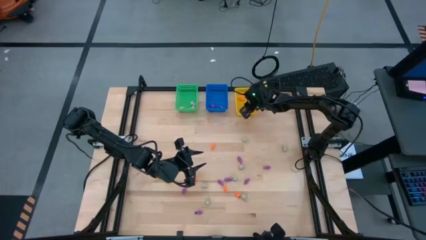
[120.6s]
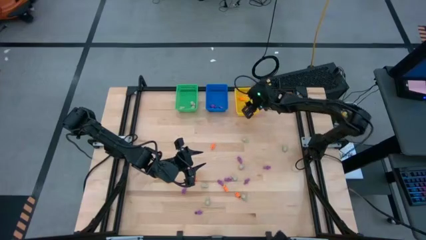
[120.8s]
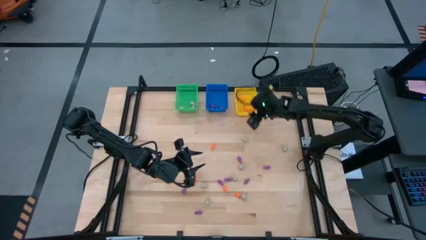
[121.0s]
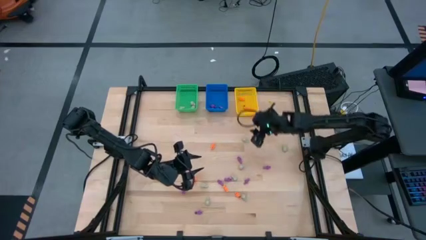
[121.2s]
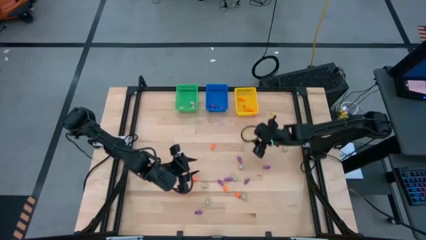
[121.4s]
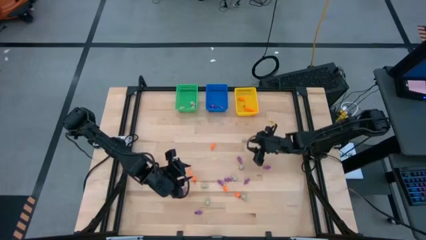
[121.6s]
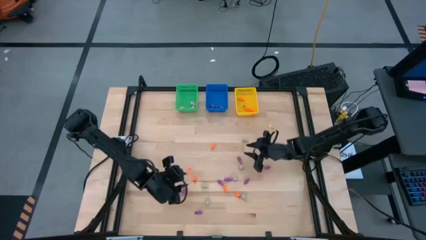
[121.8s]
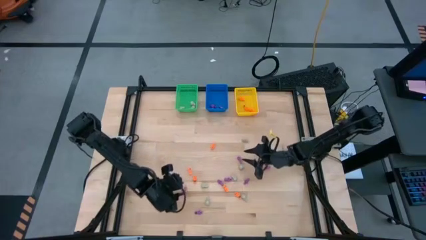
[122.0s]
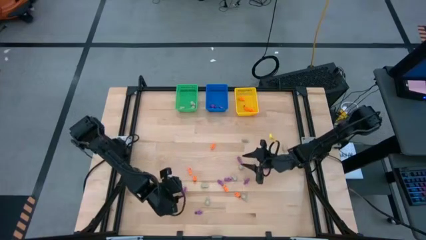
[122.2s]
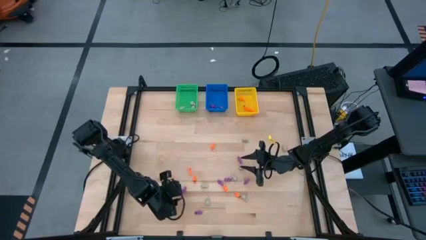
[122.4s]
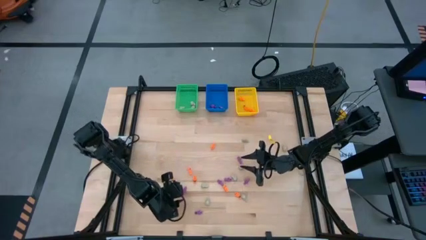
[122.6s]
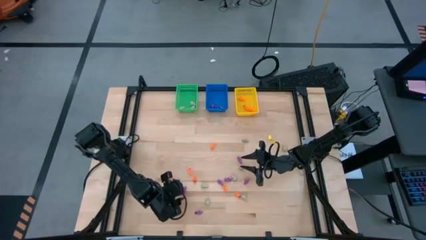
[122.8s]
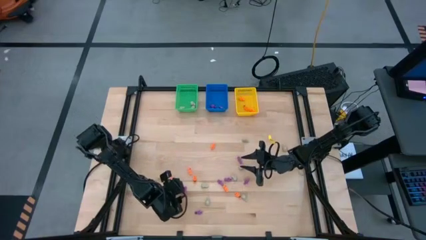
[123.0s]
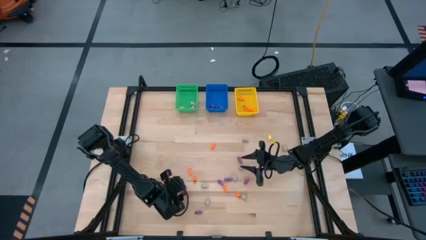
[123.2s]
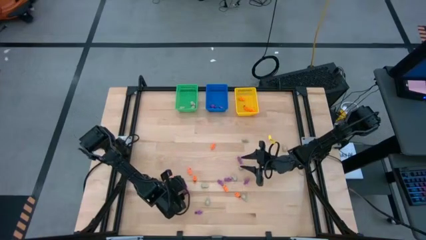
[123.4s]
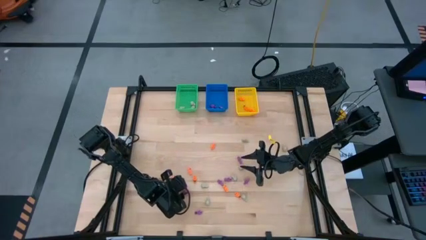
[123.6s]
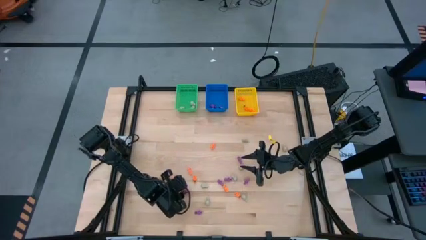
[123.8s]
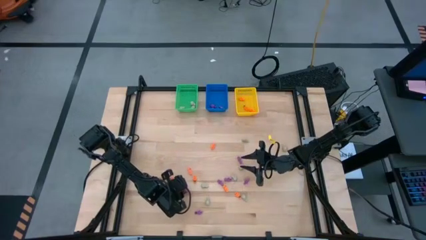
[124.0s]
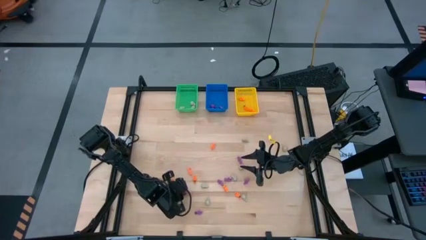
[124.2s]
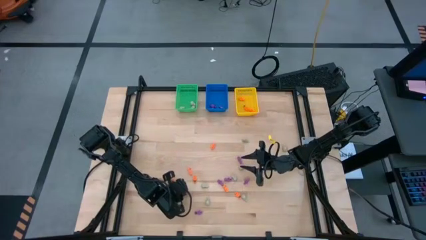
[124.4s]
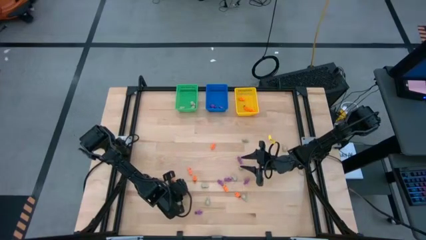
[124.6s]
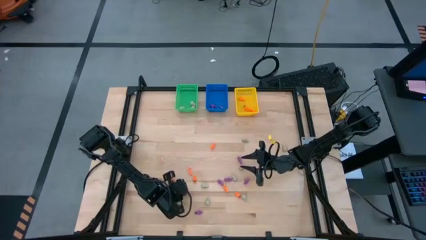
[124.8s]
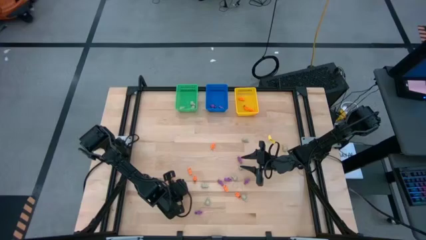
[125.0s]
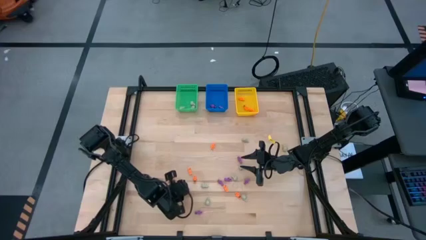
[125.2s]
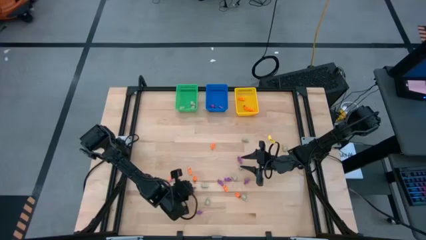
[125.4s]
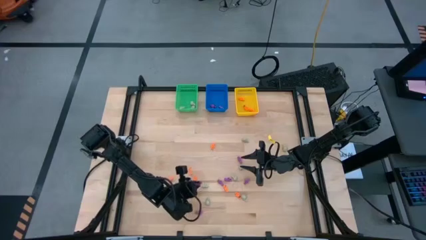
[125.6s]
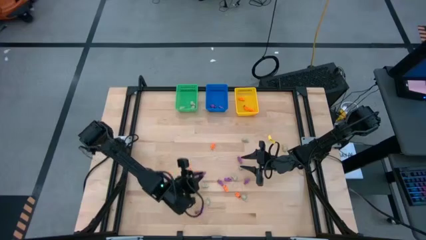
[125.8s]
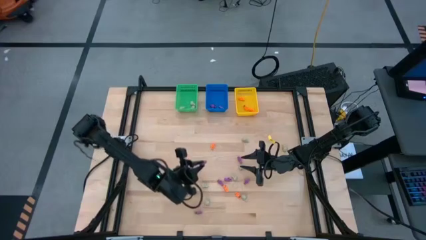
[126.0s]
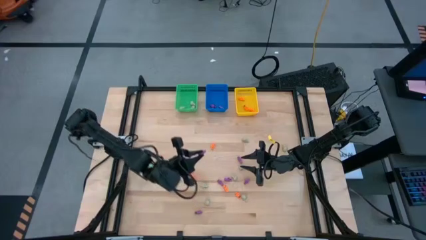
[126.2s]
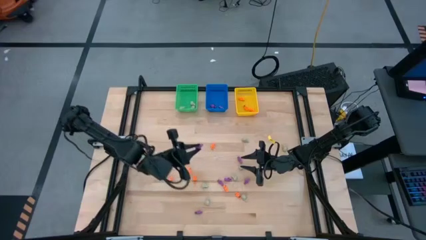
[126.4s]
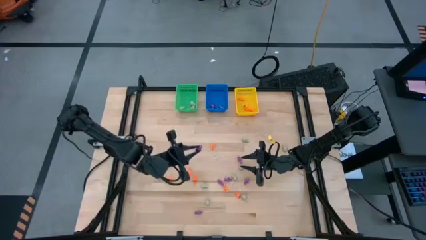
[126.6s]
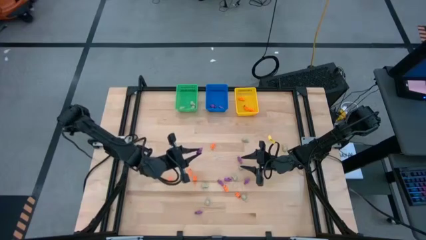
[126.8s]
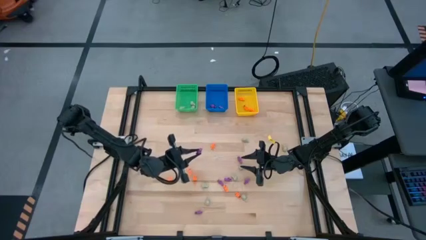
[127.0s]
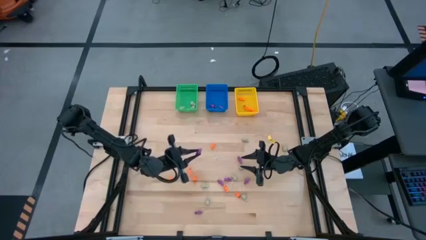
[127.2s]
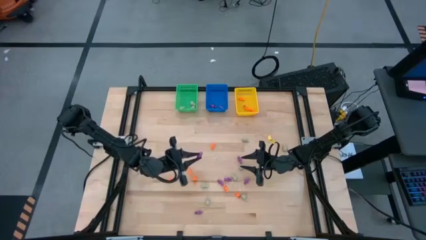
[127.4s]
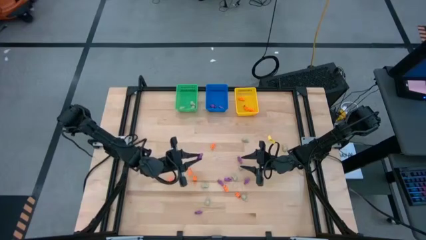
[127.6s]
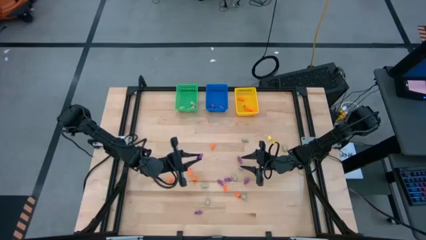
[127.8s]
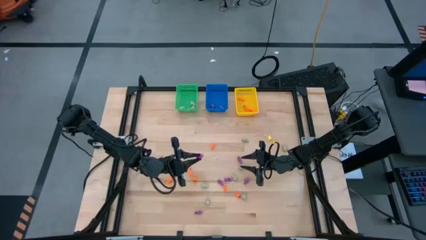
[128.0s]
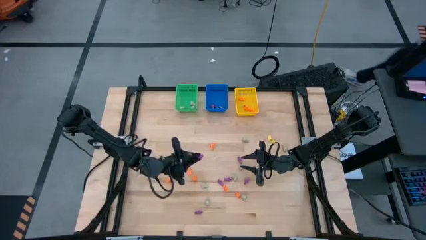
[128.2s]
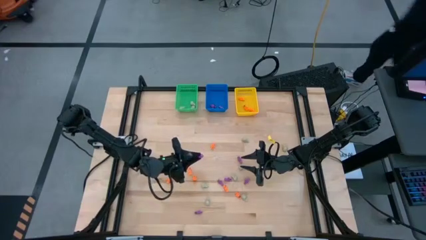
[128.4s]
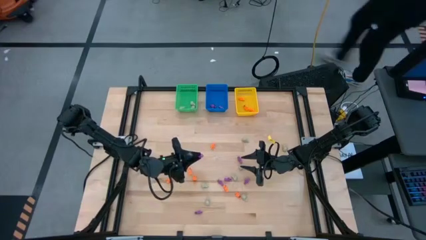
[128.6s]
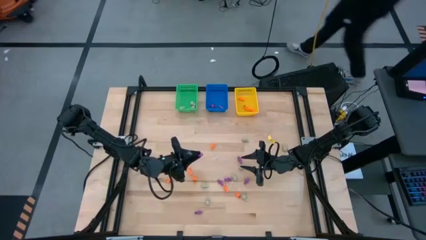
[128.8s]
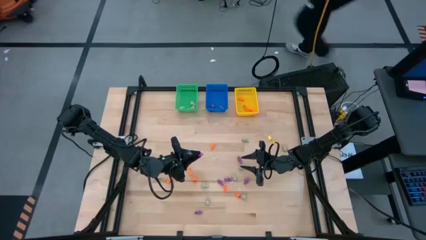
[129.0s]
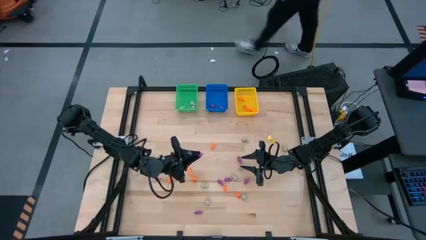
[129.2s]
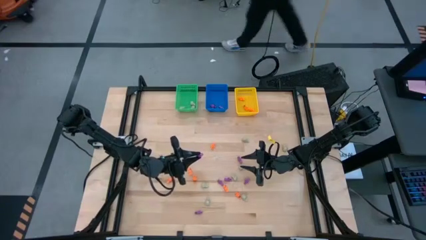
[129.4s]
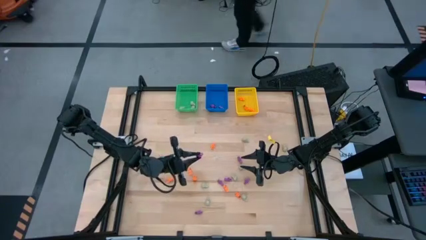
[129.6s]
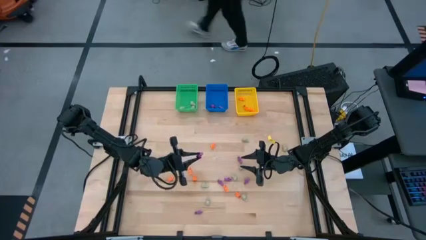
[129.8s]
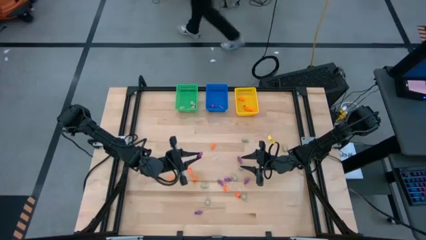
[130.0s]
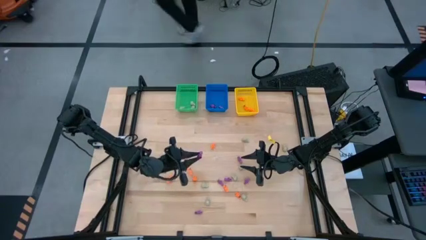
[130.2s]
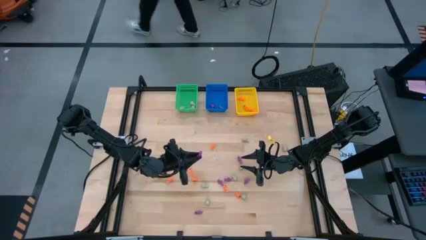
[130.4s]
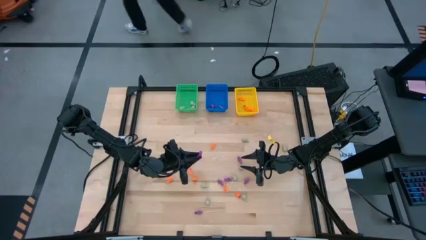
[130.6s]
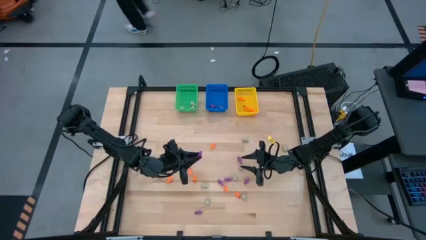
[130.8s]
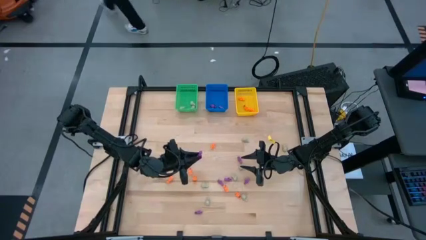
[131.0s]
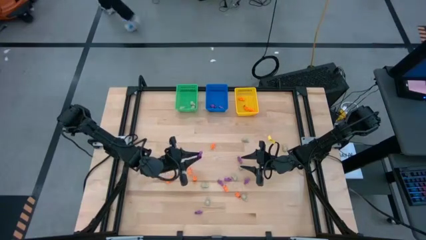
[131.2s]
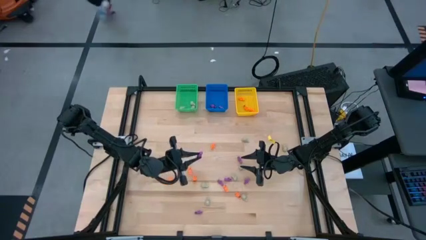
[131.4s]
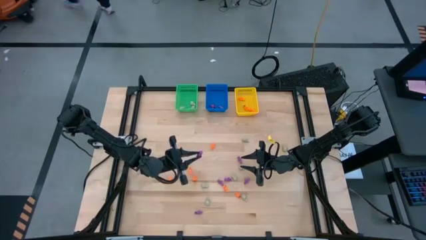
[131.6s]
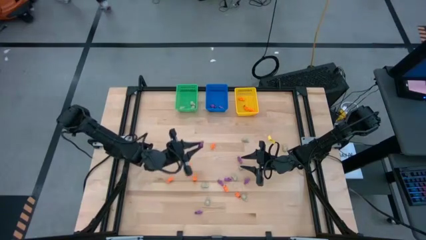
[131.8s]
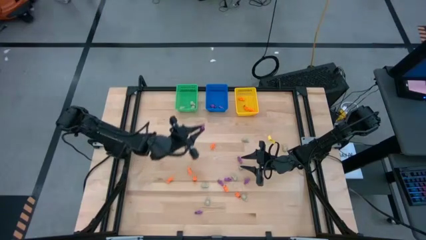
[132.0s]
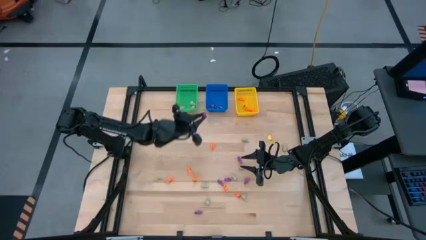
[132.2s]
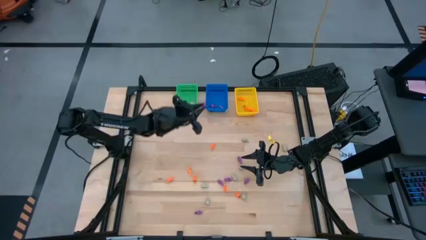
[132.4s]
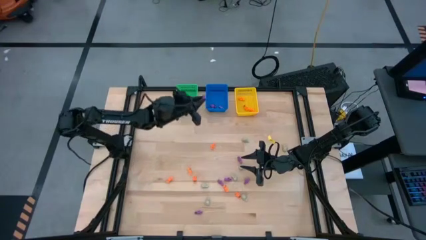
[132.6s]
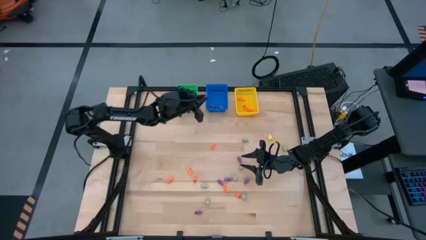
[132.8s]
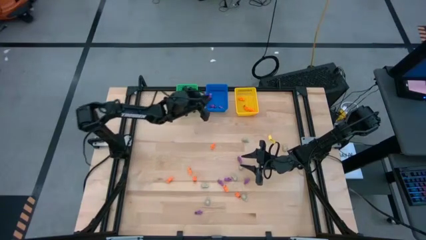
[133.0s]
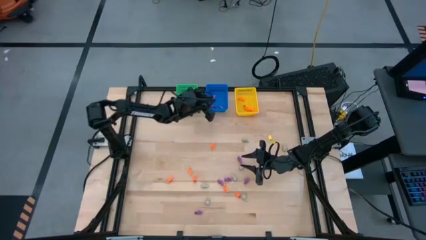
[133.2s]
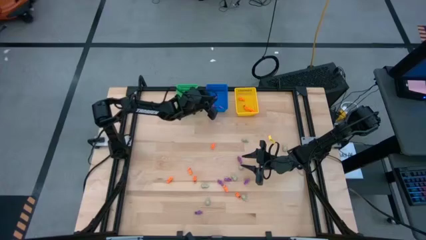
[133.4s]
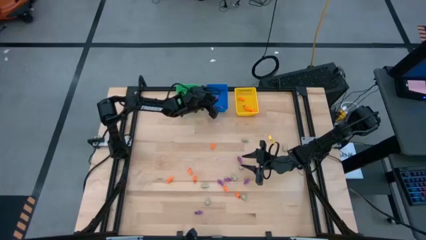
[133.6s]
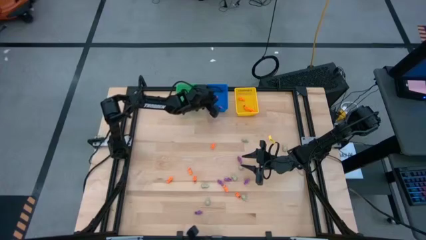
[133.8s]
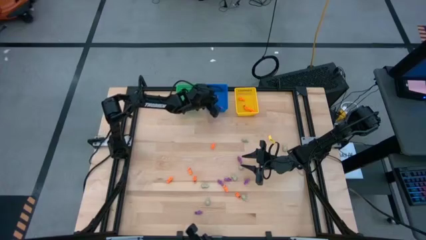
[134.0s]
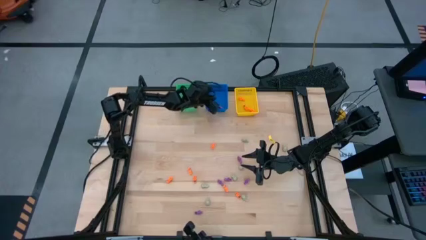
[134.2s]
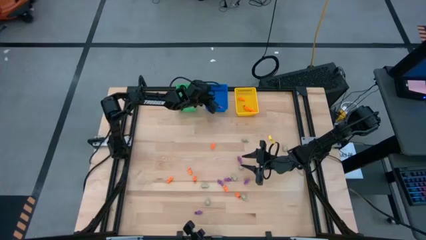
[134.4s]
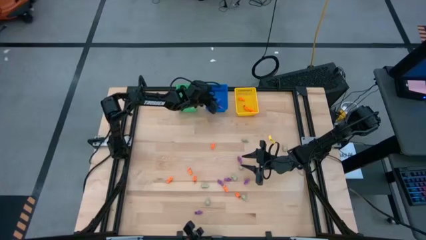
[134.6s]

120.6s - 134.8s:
Task: Sort Halloween decoration
Put the purple skeleton toy into the blue bin

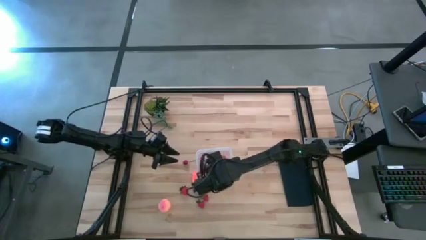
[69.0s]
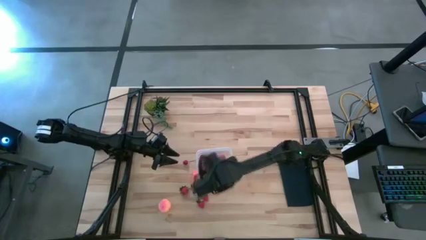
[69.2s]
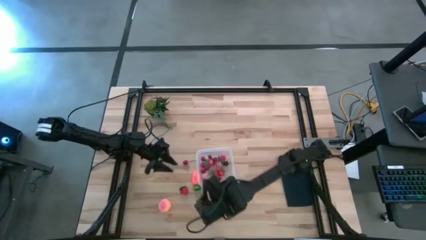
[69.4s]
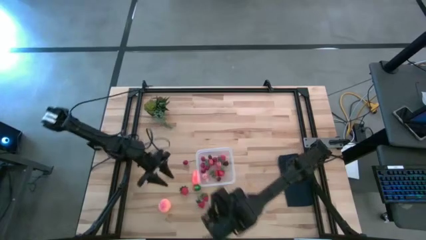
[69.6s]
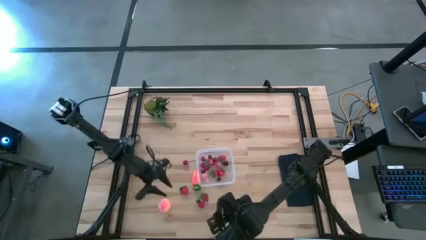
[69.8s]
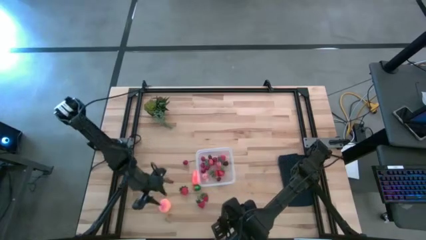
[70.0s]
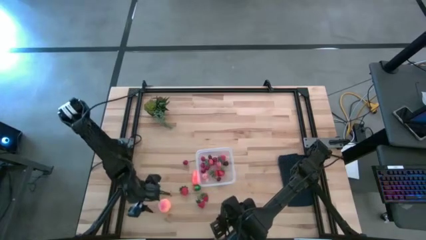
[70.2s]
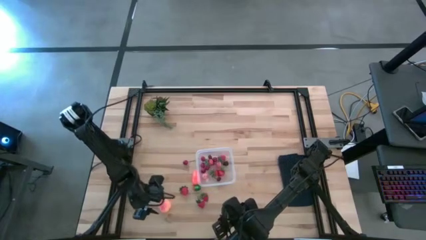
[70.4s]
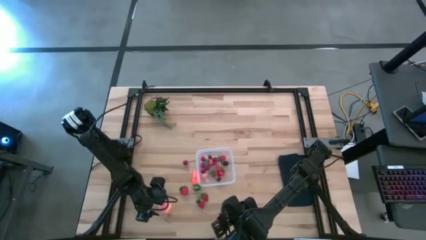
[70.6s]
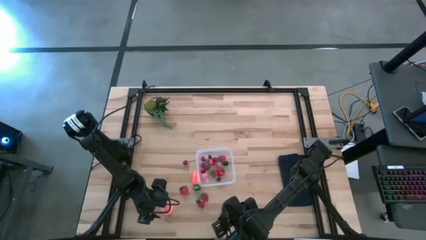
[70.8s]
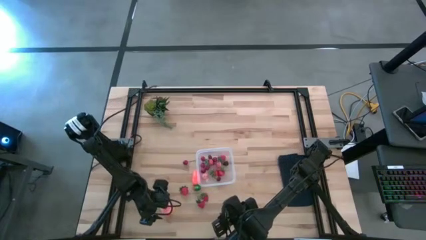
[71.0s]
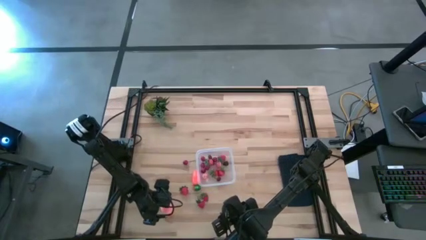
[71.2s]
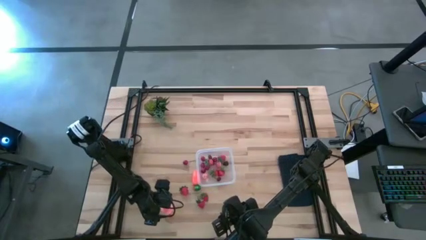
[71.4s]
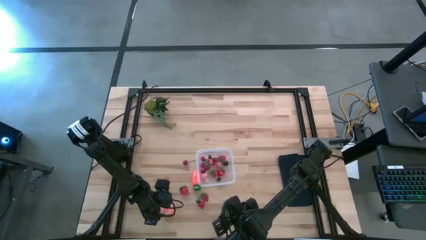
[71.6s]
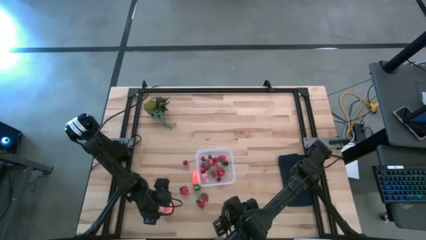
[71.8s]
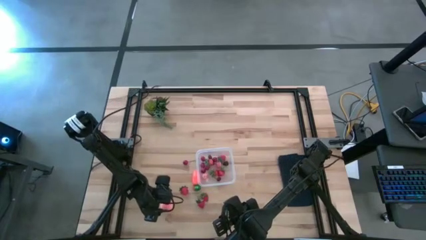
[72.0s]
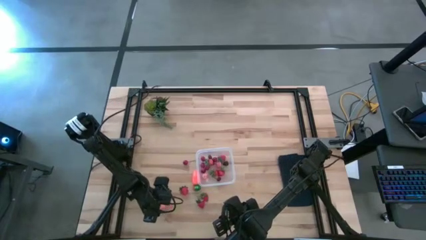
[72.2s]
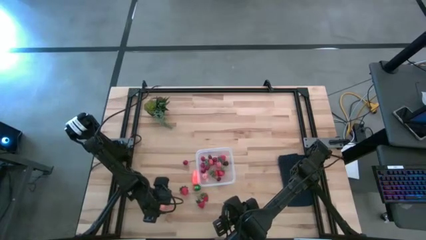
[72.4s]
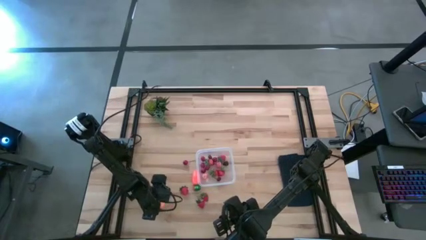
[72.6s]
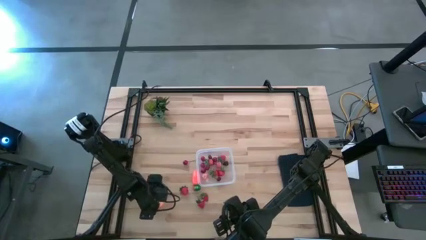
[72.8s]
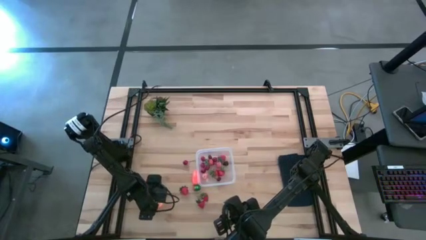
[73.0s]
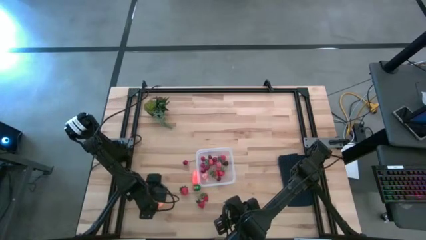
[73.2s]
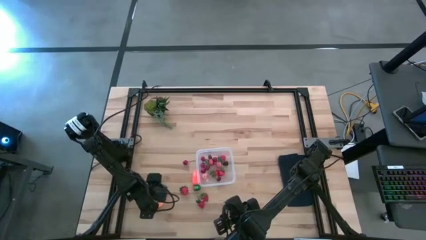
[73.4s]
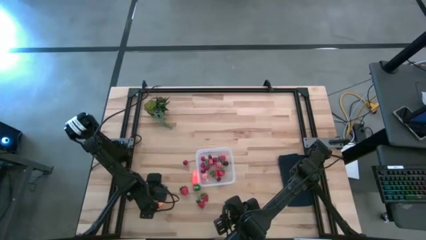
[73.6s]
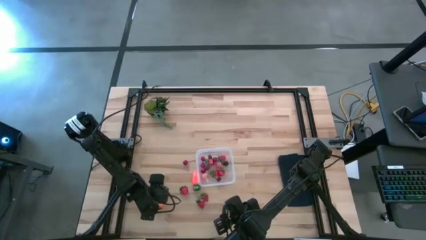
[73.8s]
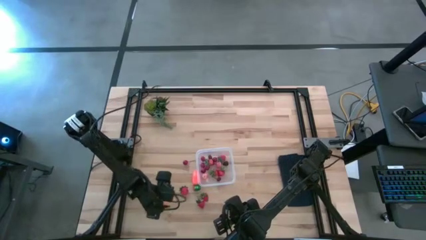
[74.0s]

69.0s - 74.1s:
Task: Pick and placing Produce into tupperware
Put the peach into the transparent container
